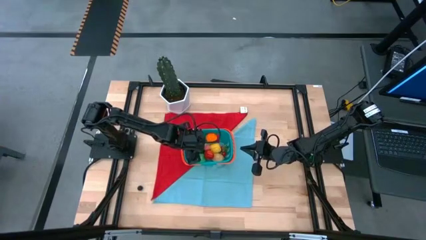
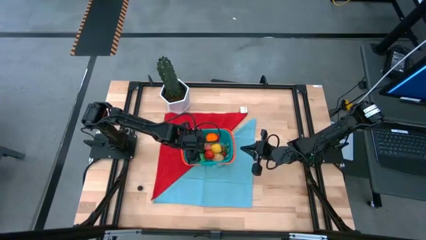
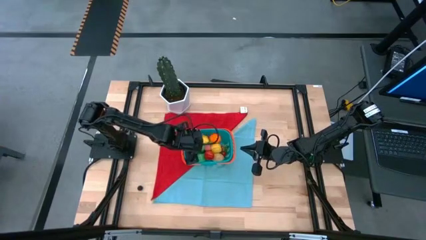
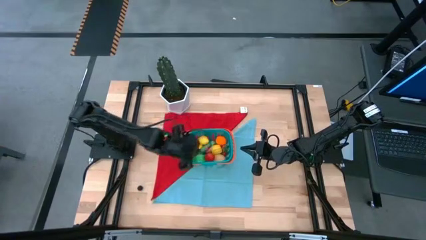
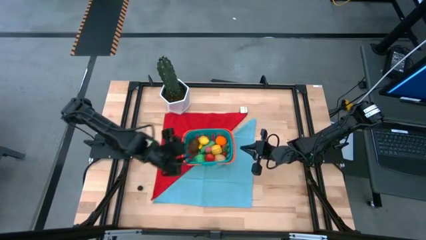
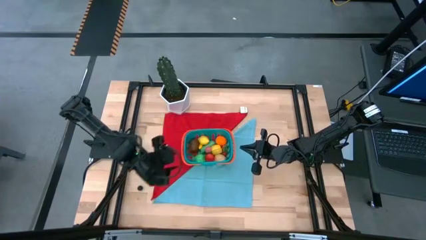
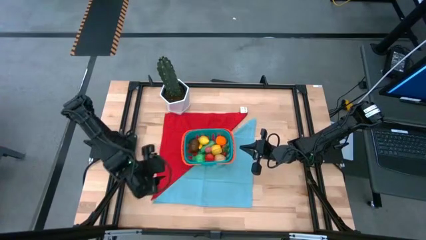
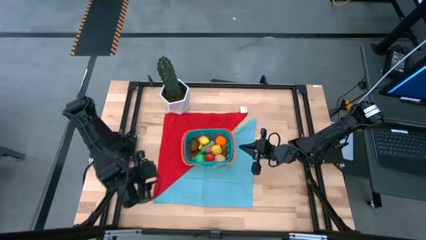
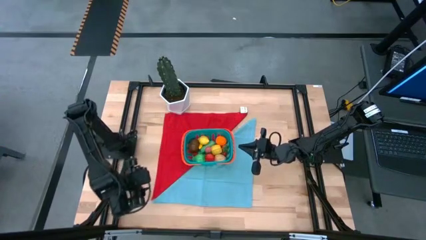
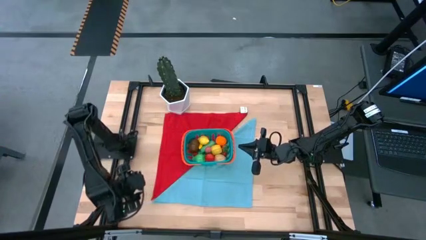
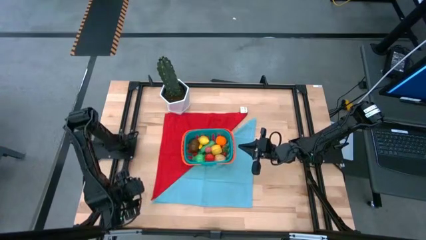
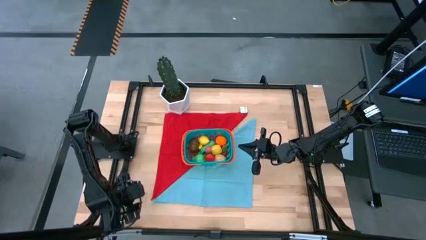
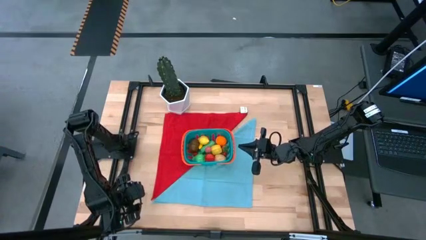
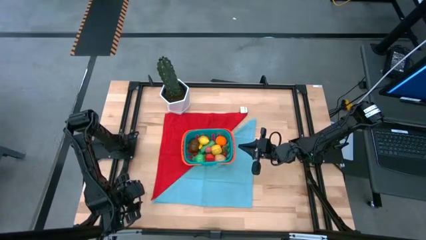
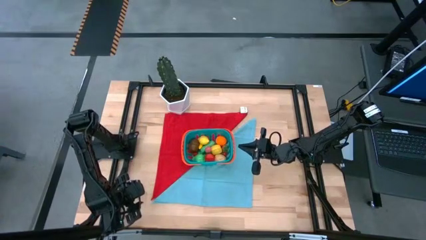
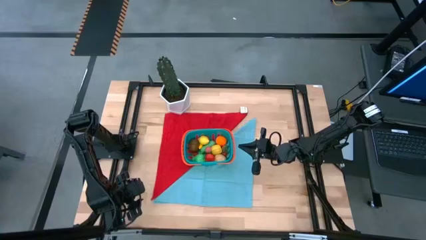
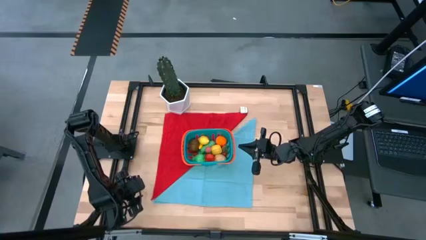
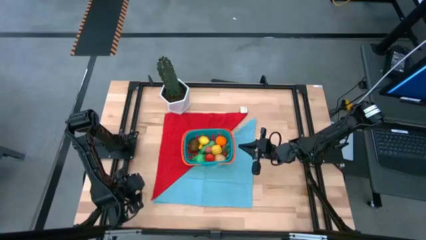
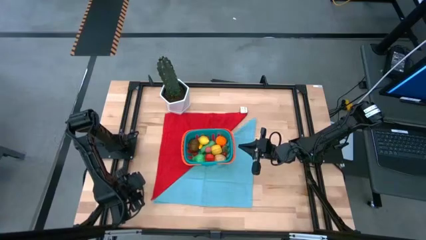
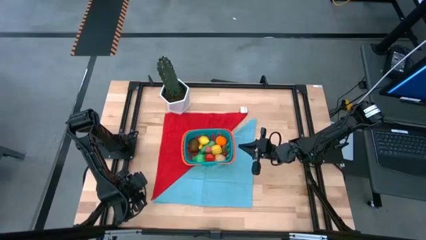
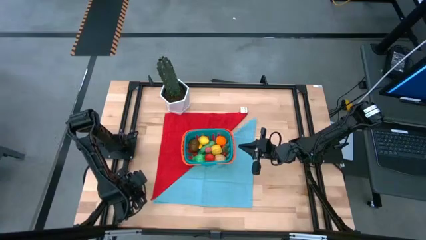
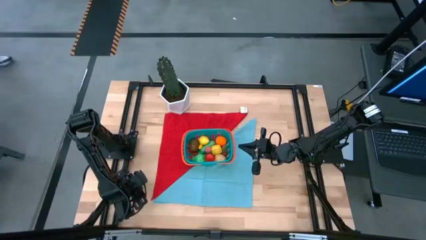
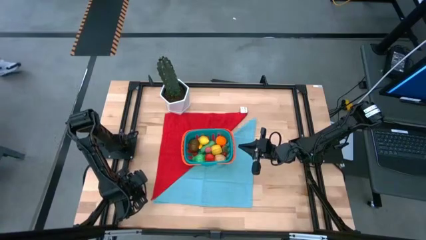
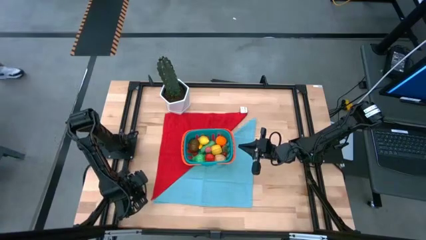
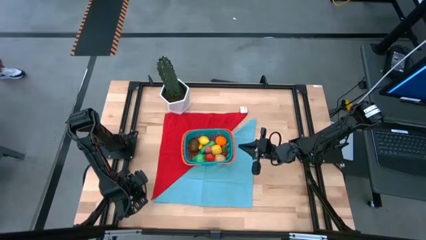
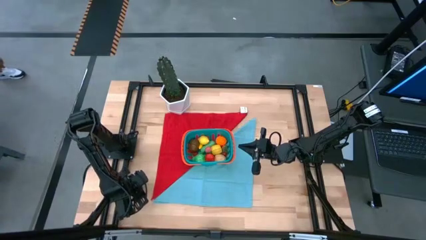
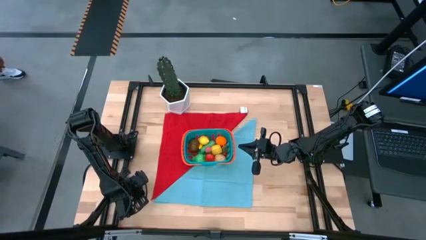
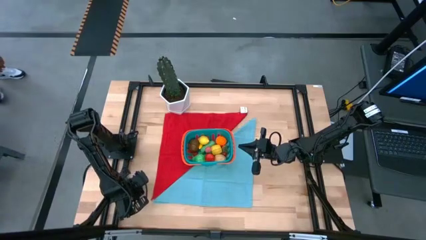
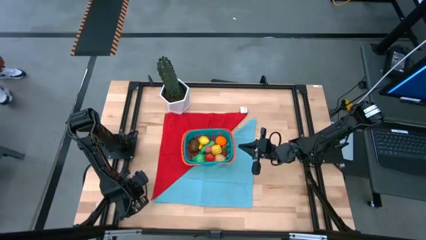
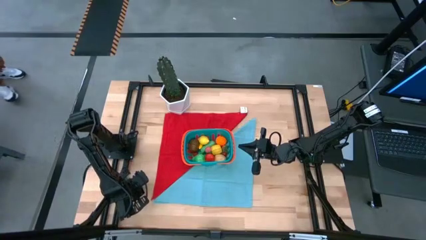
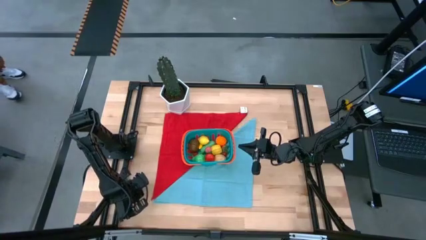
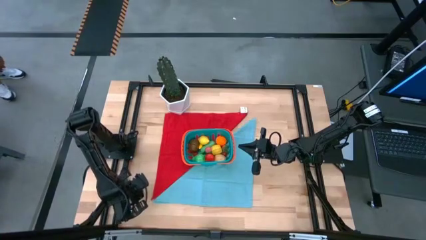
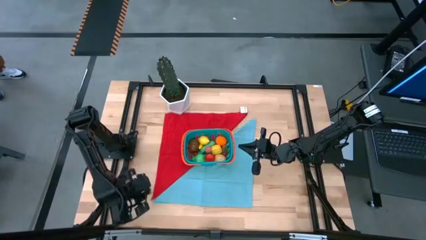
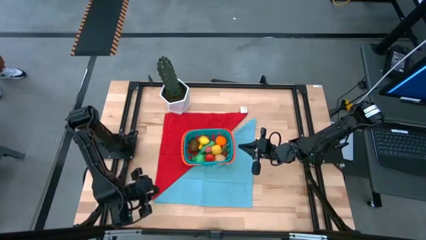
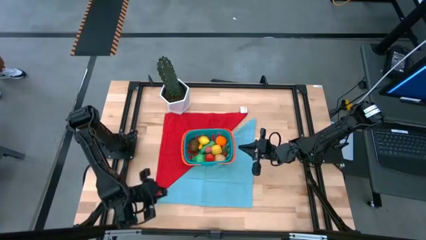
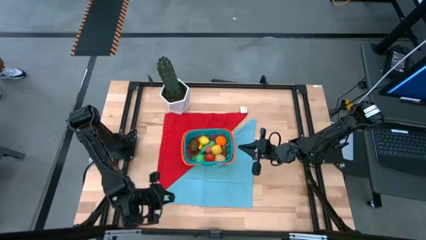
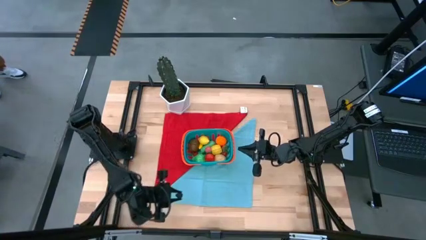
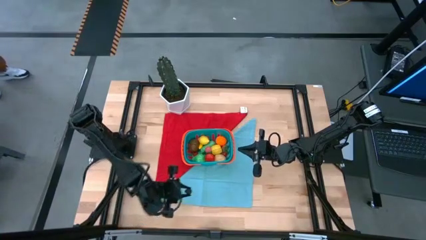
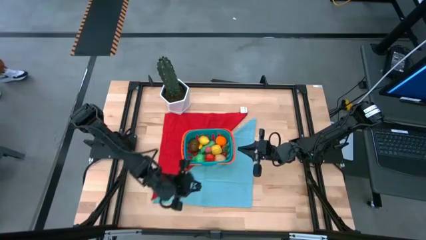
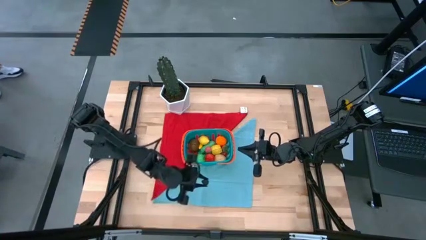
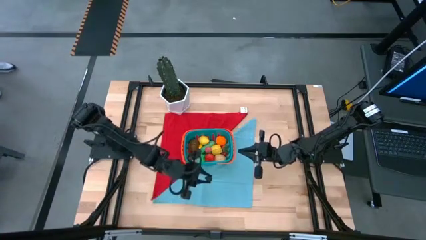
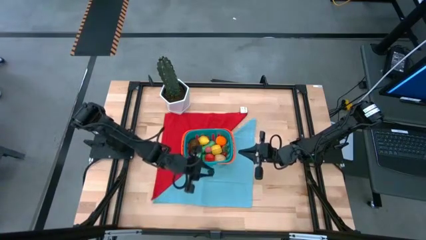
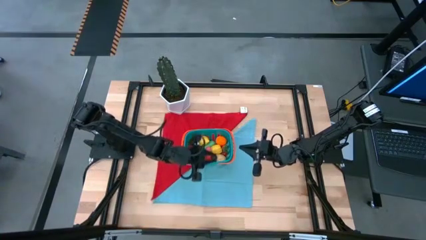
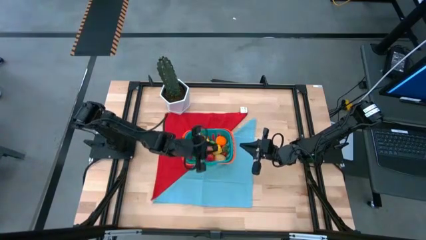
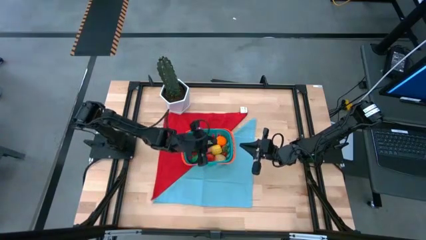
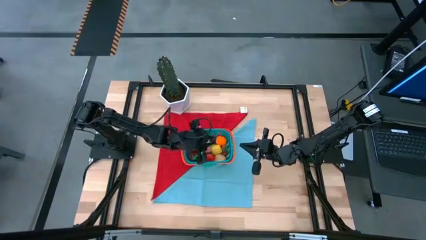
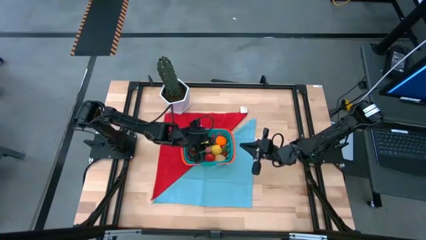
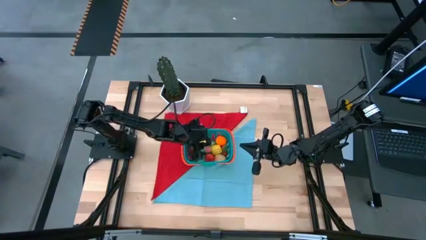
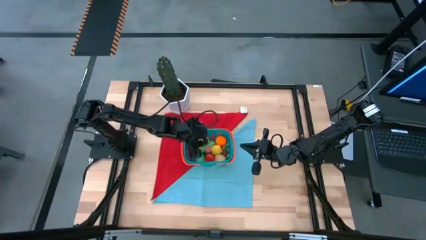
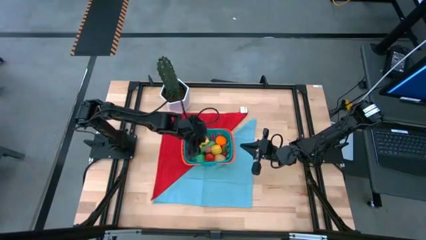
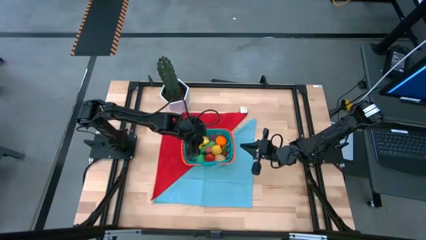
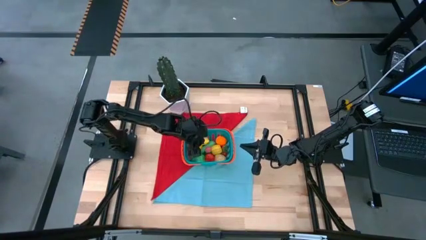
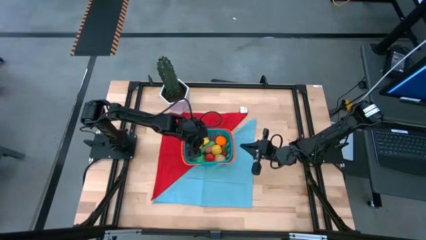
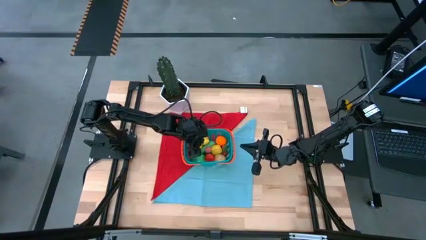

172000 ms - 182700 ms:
Task: Build produce basket
Put the blackberry into the blue basket

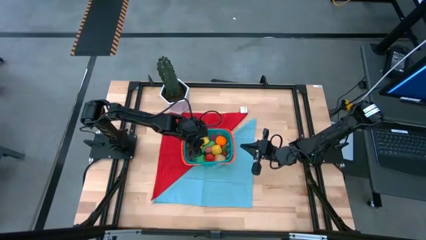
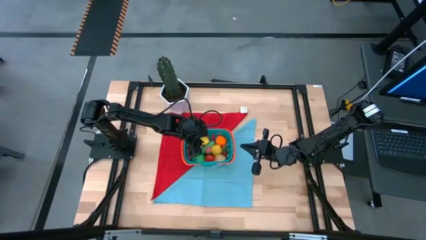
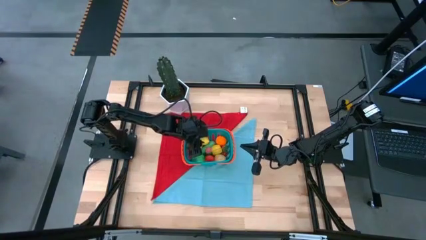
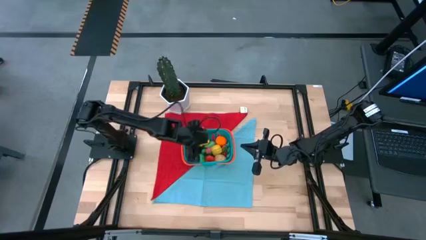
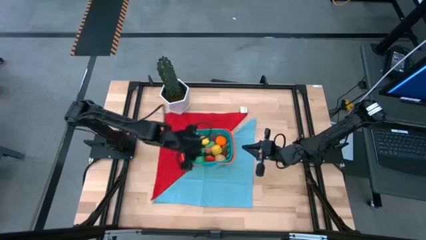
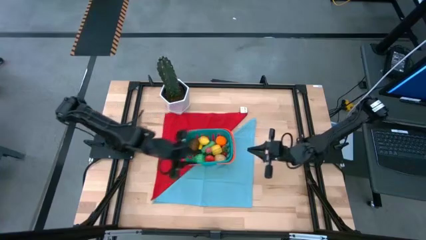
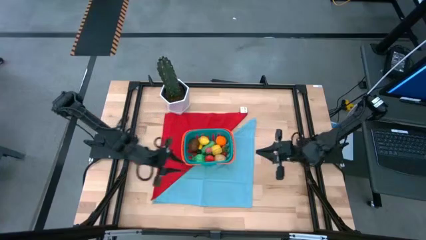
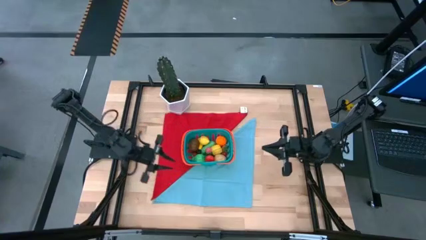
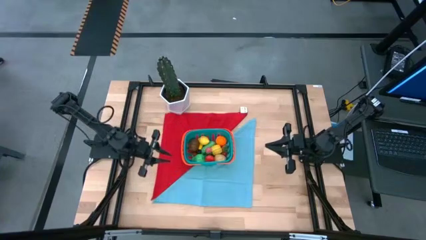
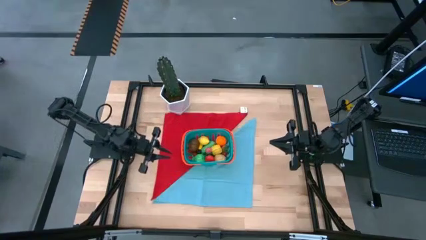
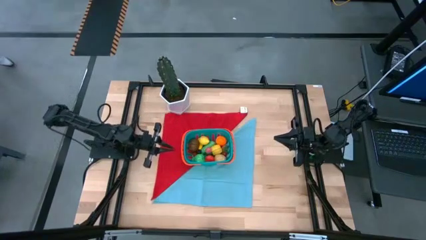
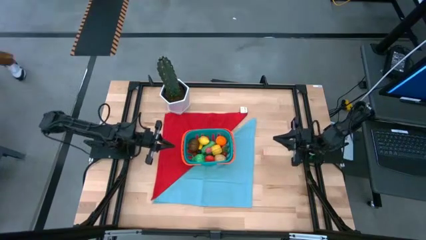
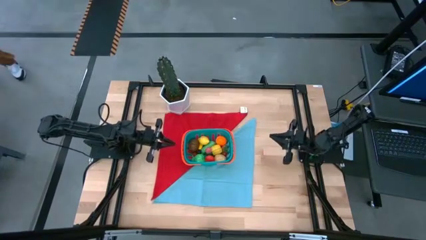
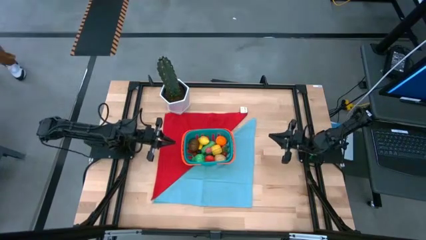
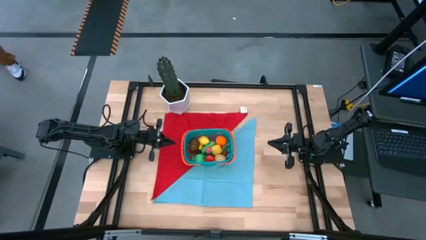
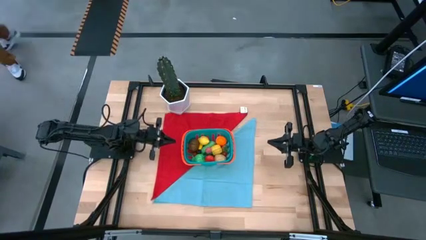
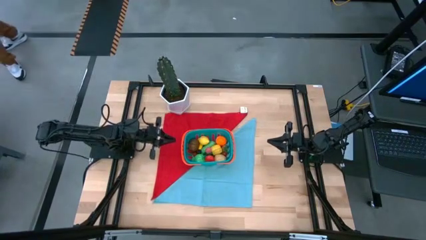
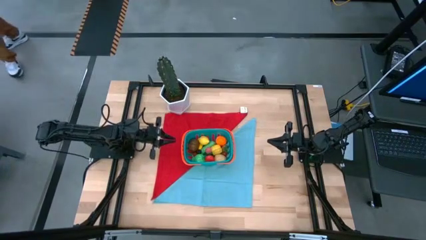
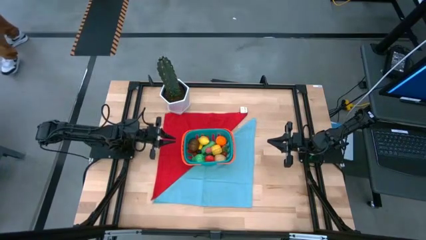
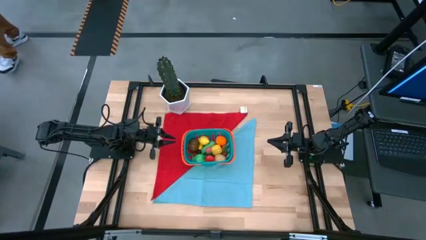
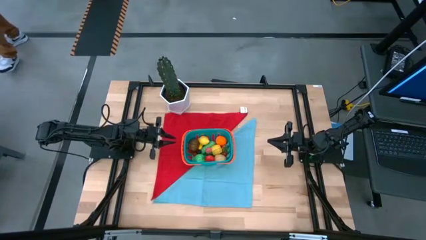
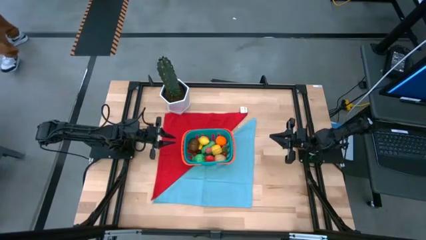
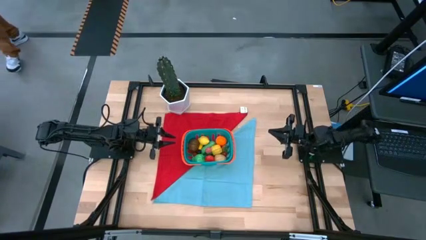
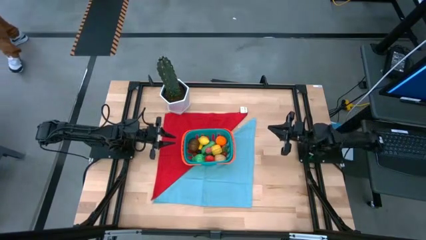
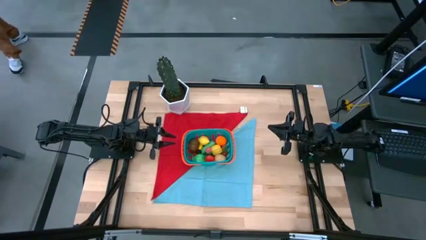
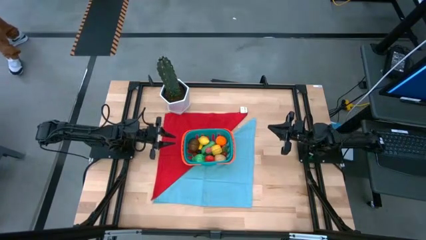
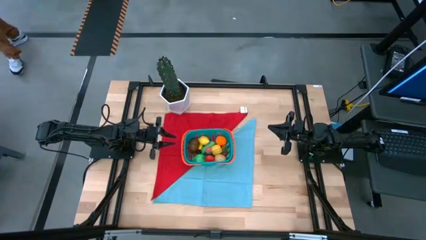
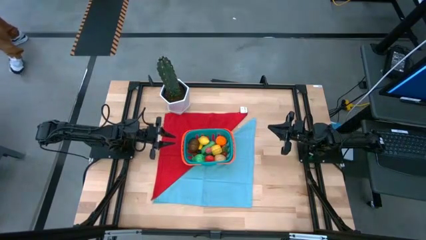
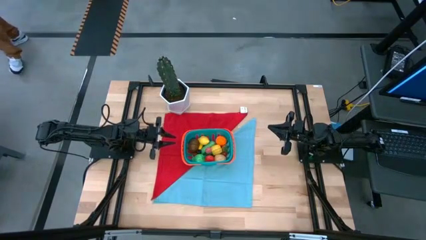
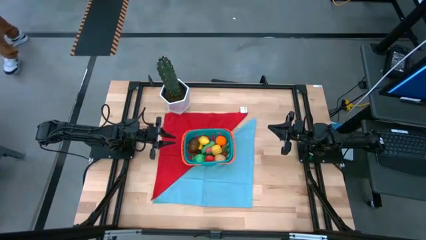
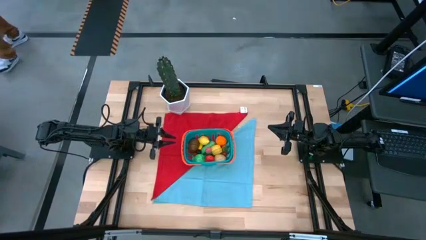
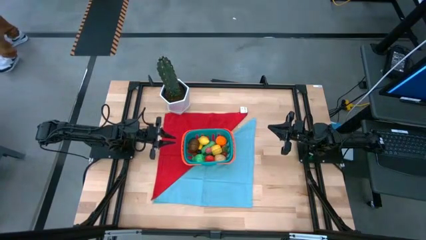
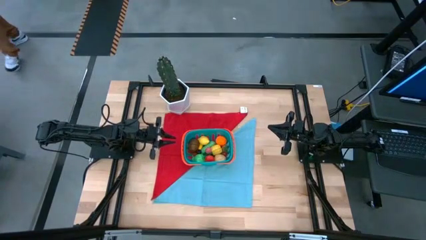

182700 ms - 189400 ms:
Return to Home Position
